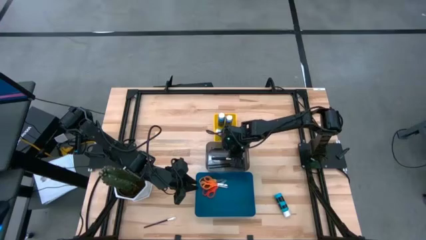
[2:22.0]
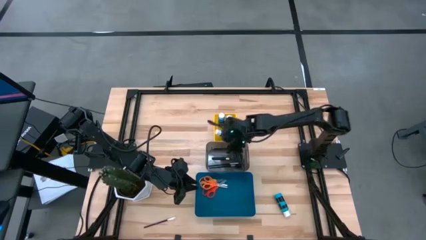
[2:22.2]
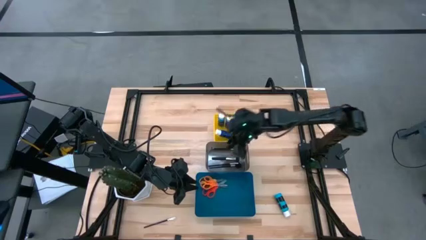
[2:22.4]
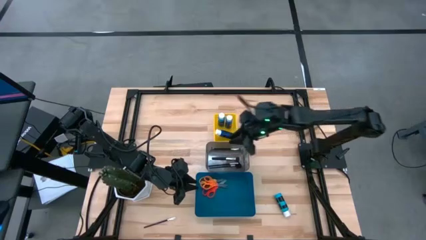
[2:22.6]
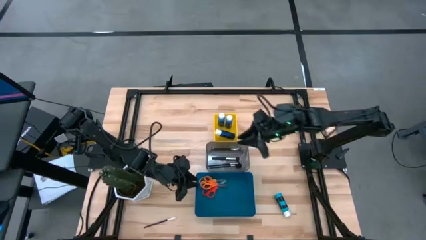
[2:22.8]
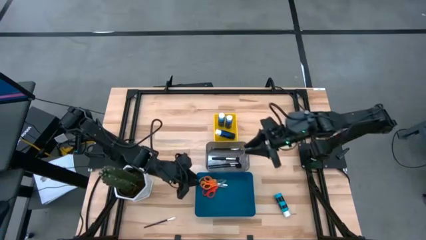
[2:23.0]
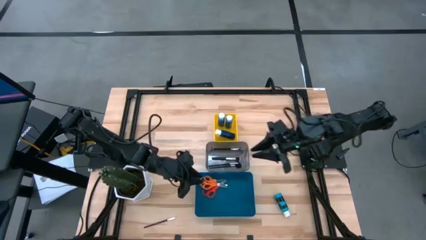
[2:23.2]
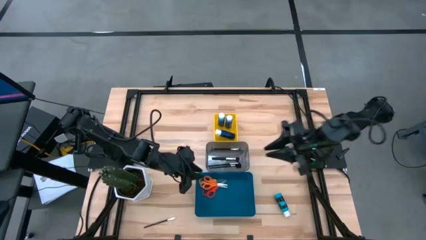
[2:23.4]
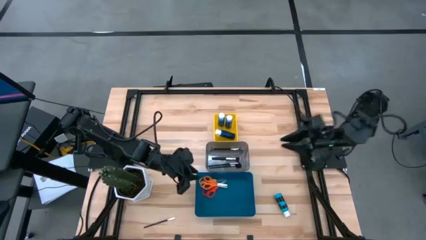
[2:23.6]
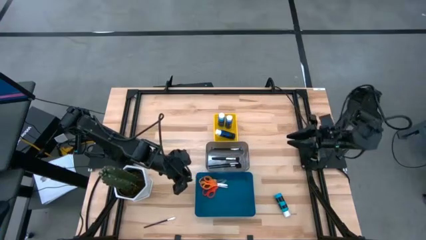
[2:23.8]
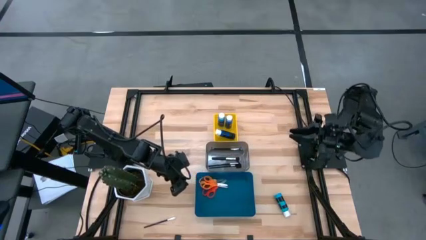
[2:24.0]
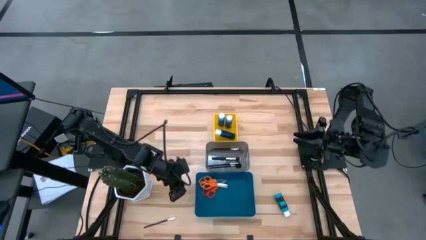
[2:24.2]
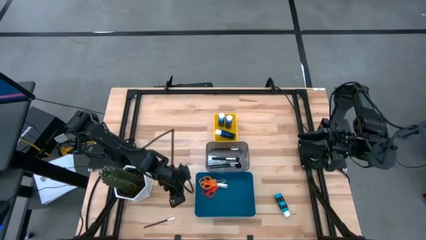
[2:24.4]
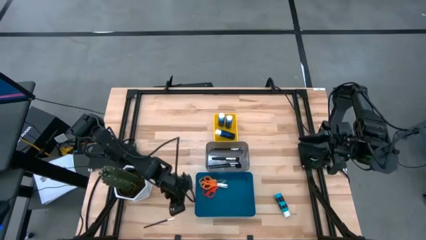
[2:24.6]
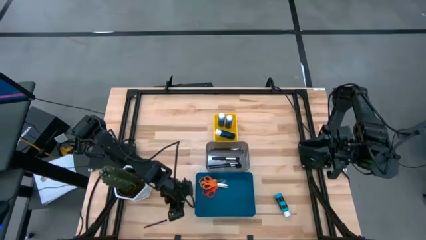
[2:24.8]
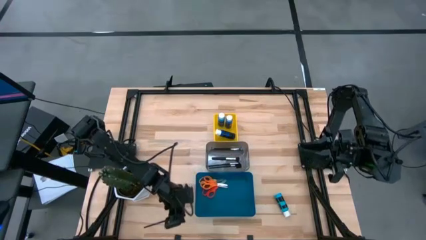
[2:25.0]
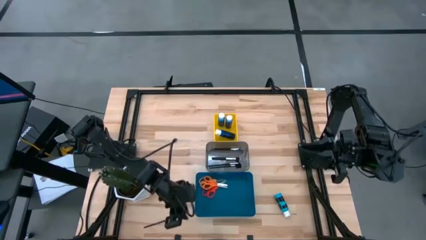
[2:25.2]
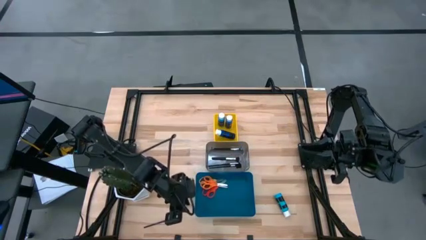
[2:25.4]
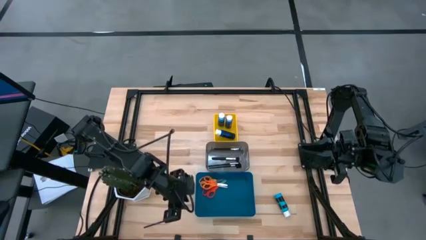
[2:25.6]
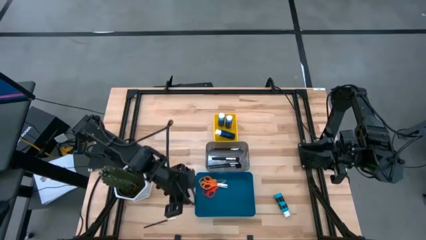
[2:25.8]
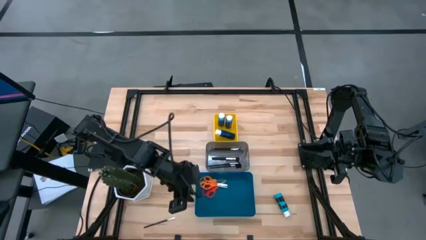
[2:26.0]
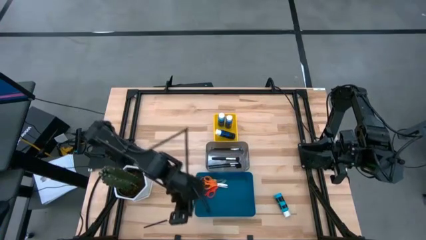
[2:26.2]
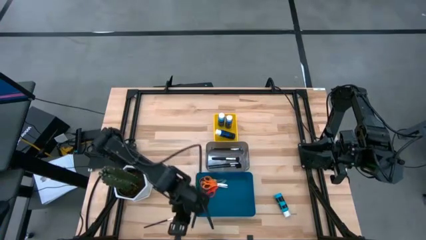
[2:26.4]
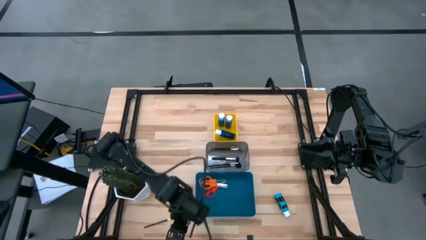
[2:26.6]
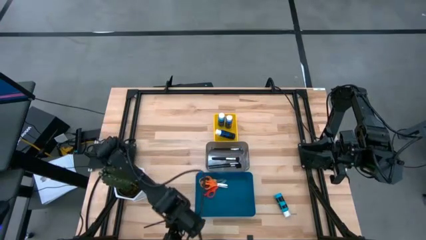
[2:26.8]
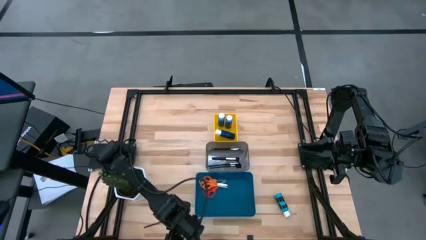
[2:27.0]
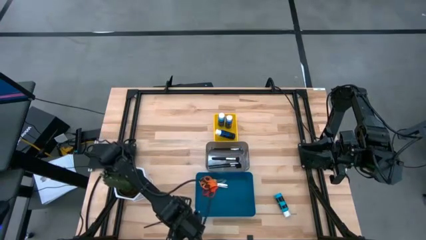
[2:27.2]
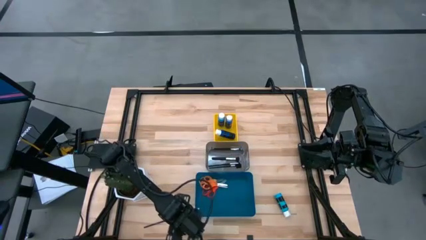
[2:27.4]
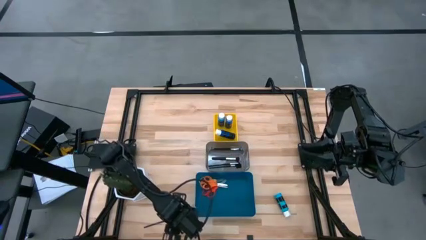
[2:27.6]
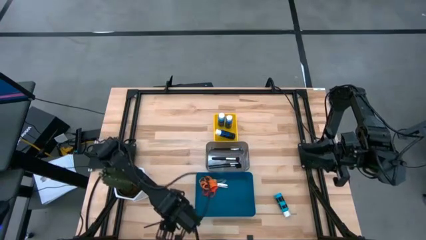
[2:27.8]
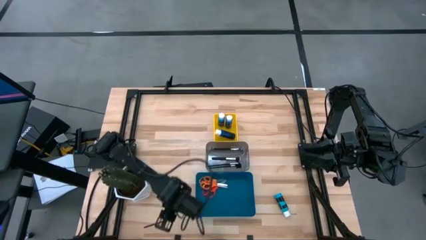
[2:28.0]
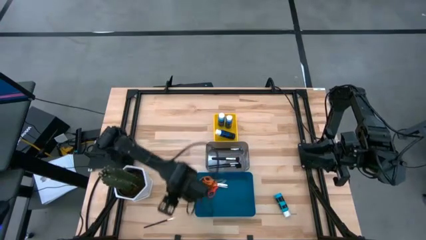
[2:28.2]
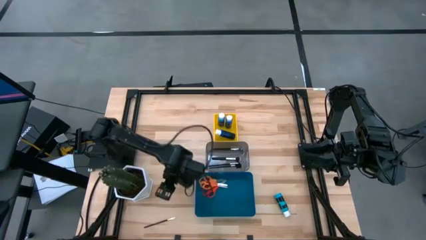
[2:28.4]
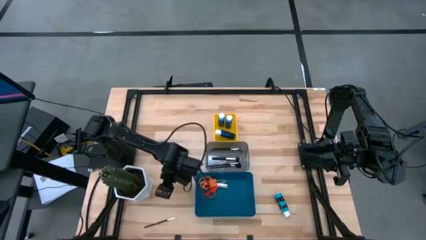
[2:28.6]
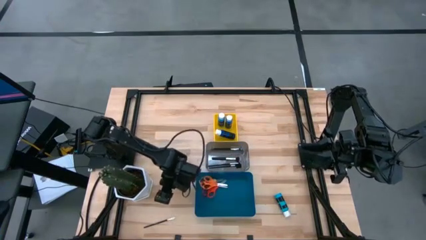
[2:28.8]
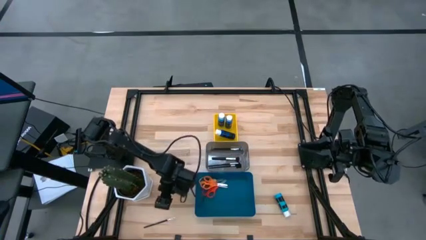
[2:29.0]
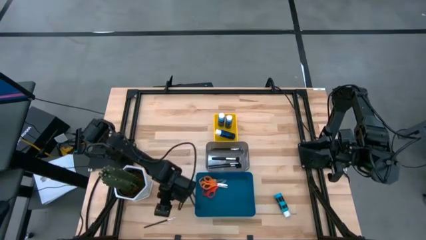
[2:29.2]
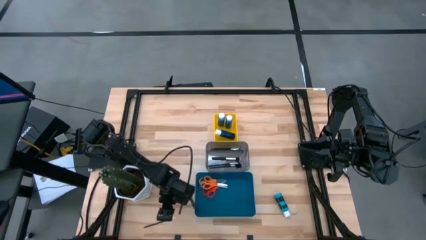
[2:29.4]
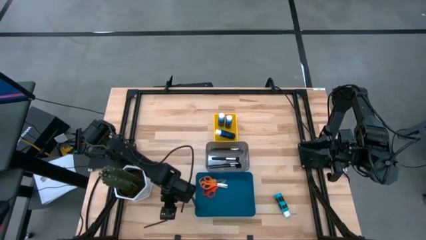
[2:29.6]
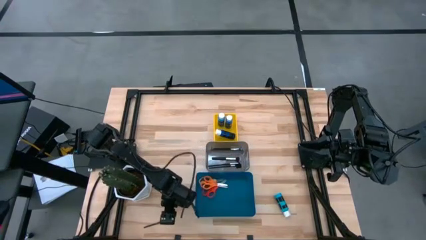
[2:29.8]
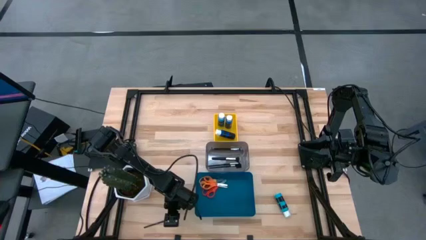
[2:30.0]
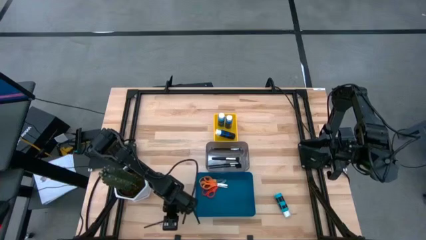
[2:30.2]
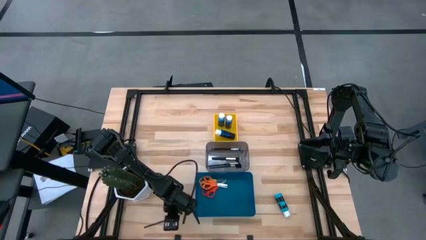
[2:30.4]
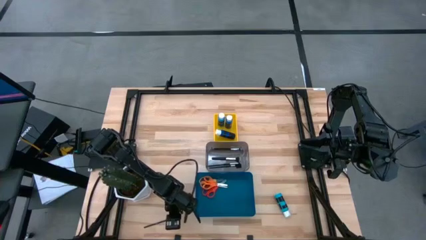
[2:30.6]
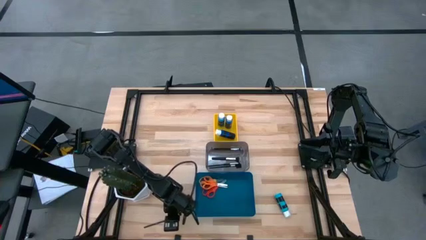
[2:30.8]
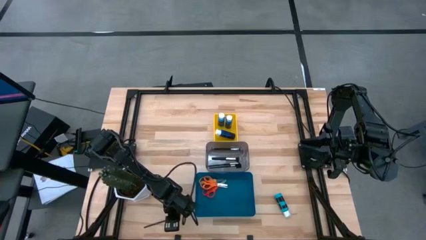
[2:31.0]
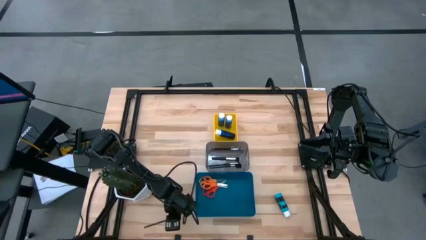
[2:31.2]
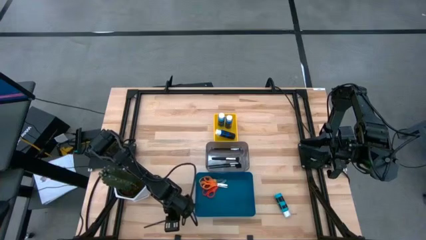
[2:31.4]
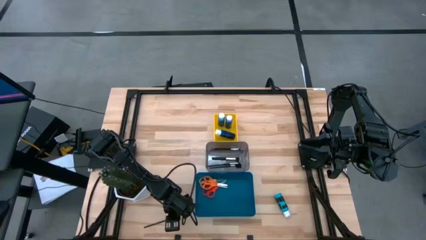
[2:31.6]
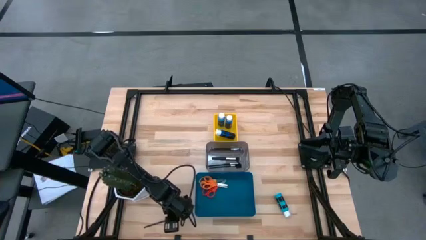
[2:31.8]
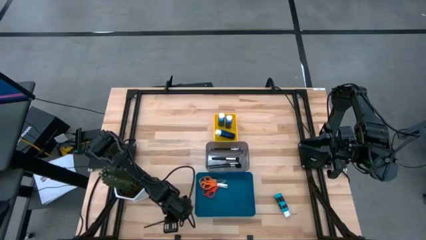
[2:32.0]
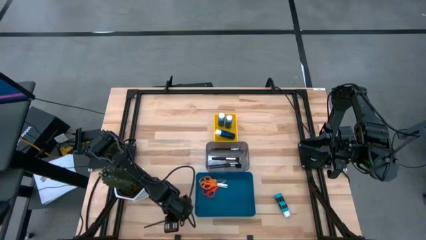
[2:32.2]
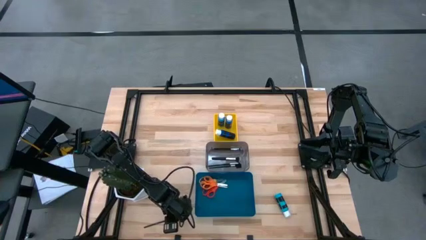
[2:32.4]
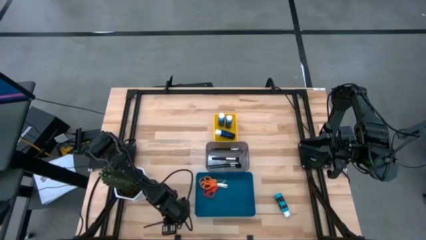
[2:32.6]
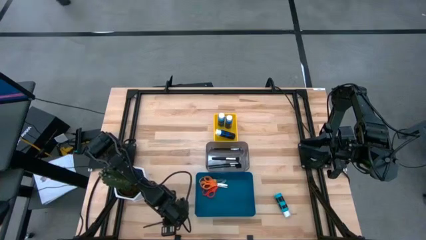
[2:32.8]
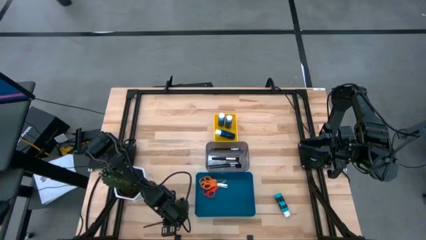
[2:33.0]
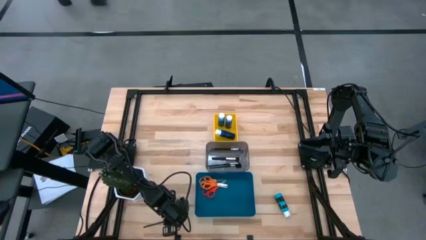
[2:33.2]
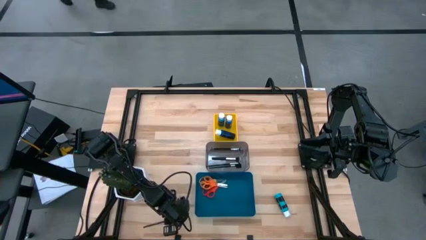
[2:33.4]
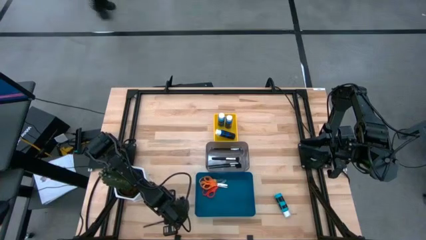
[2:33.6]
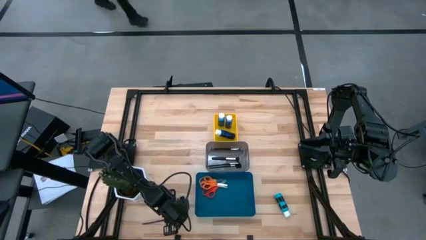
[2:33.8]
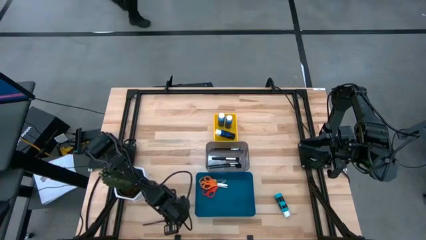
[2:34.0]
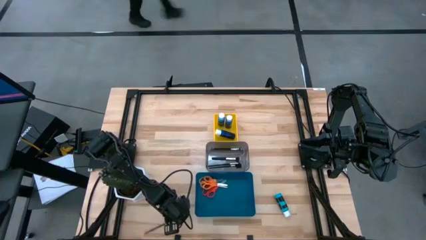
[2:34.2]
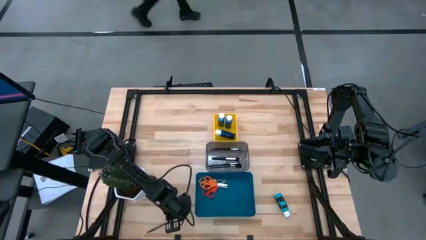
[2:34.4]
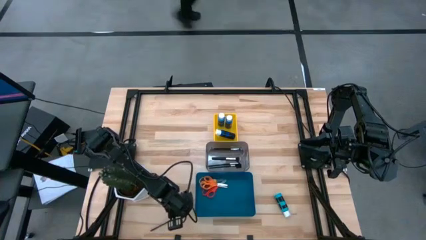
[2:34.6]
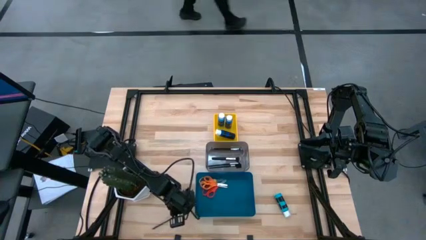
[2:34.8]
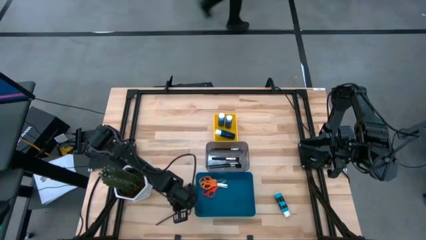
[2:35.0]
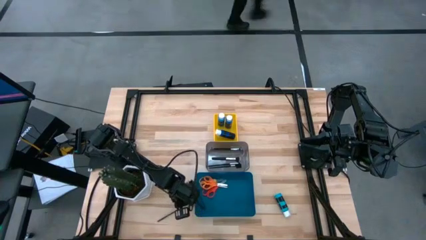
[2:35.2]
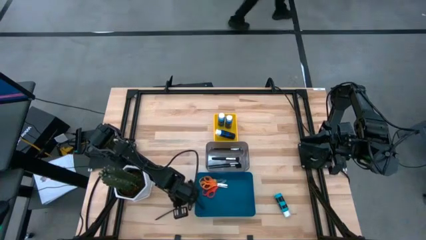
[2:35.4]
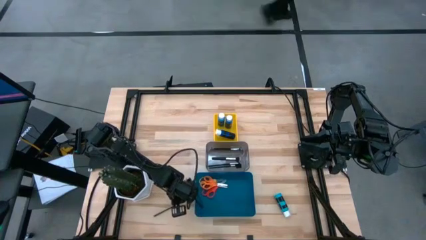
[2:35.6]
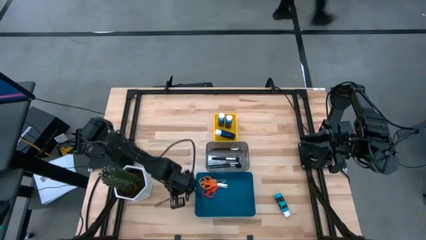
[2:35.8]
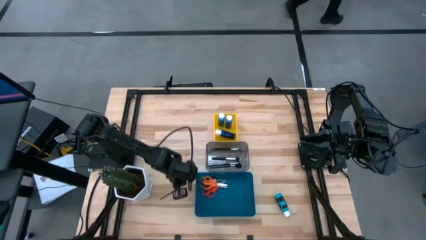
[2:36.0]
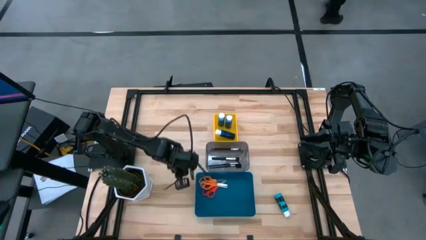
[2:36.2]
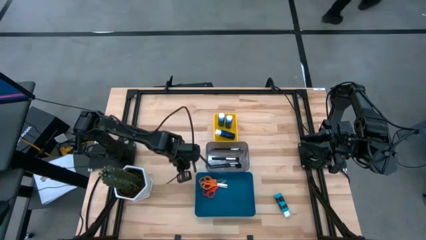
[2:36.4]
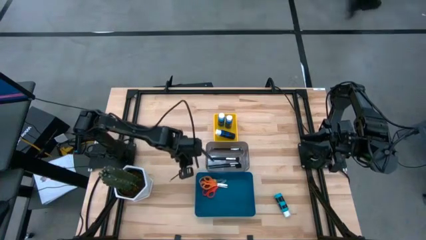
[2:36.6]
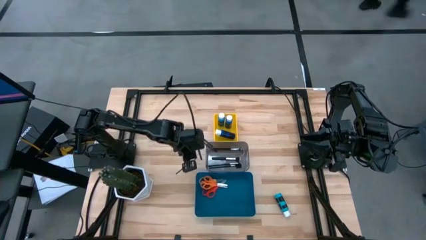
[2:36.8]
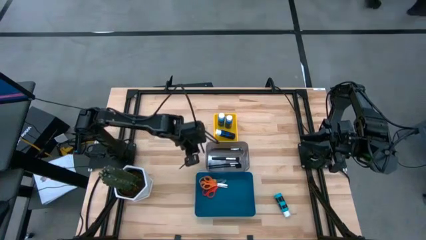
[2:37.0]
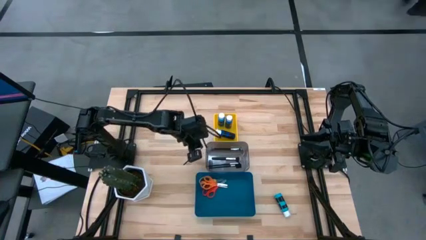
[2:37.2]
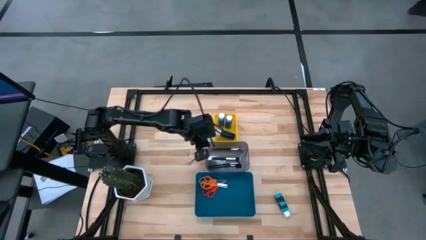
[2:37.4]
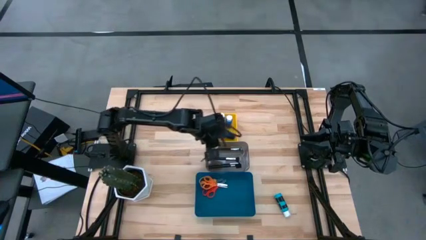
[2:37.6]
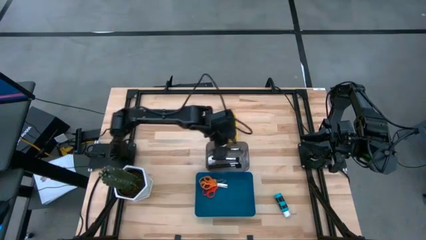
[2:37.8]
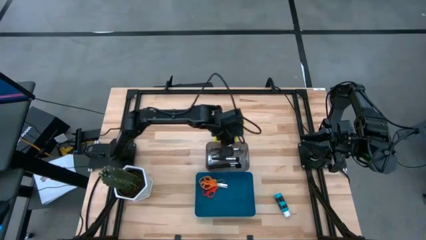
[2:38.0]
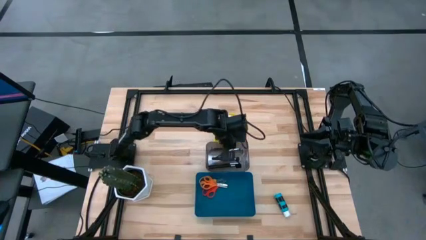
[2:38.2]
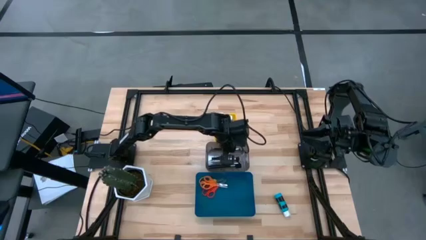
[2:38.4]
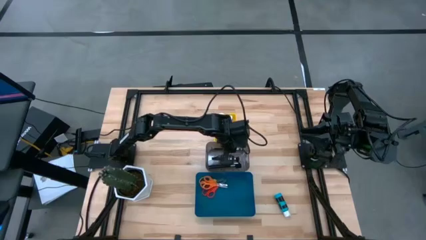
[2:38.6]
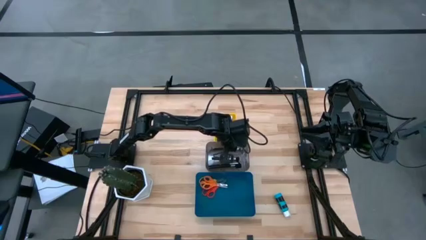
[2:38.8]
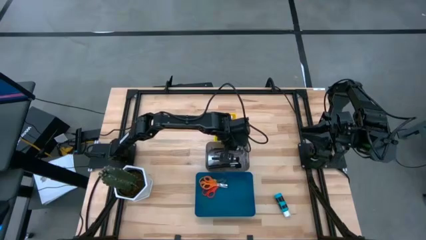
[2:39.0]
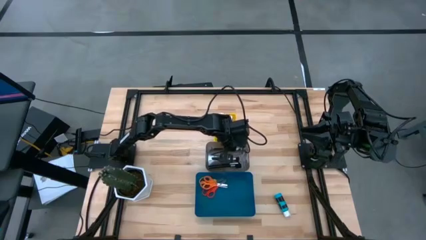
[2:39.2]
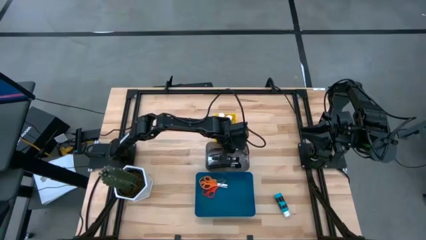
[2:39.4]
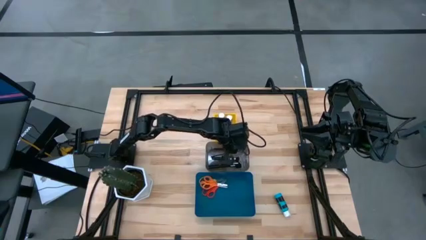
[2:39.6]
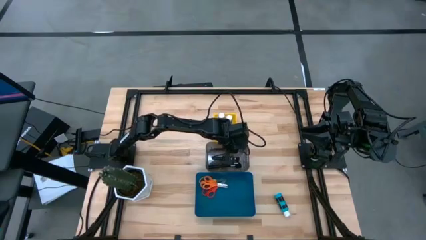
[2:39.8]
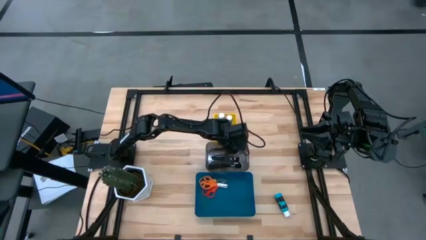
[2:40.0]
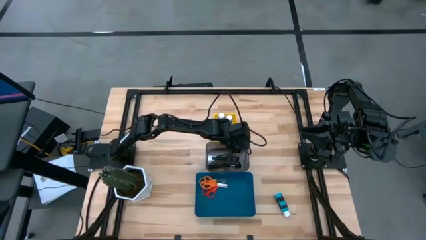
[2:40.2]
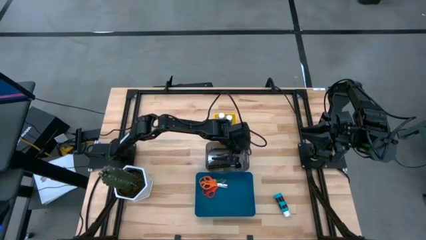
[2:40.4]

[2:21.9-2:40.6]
Task: Pick & Place Paint Supplies
Put the makeup brush into the black bin
